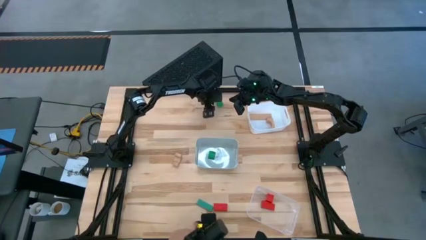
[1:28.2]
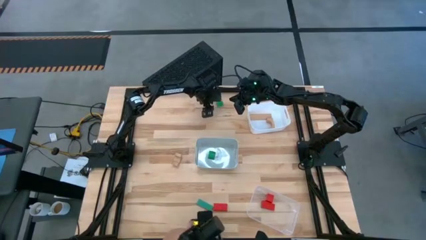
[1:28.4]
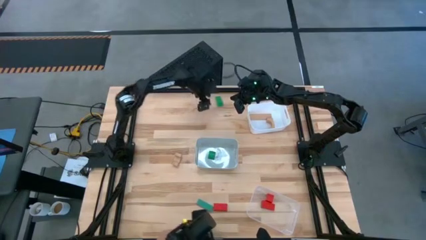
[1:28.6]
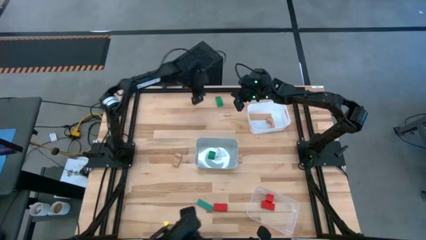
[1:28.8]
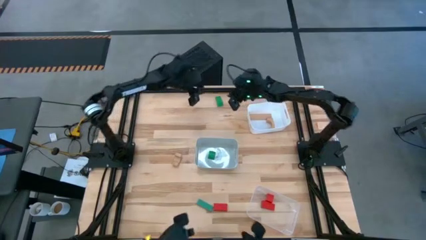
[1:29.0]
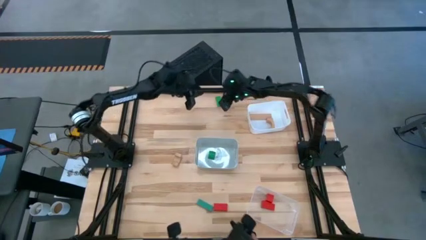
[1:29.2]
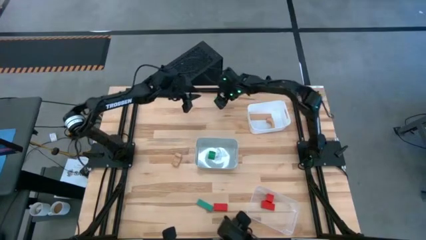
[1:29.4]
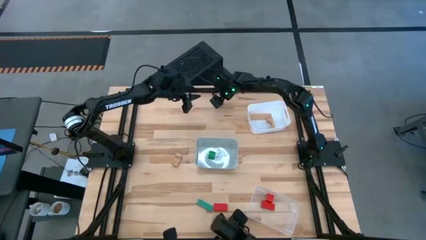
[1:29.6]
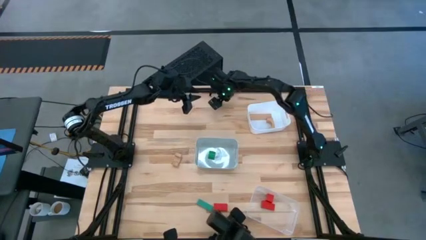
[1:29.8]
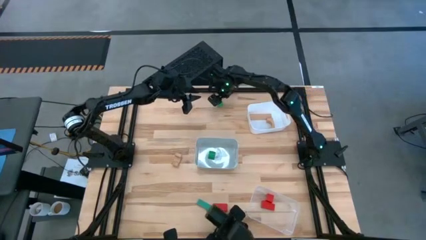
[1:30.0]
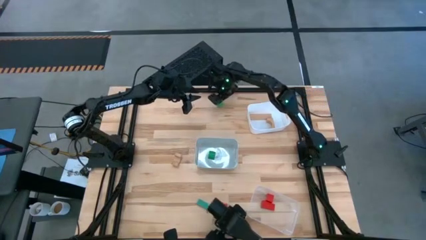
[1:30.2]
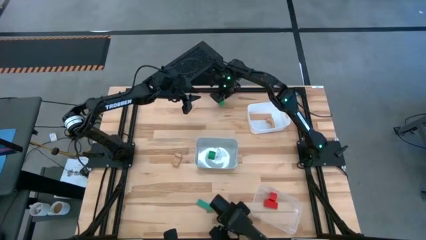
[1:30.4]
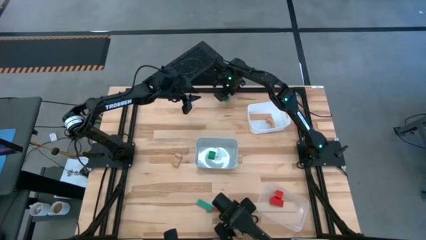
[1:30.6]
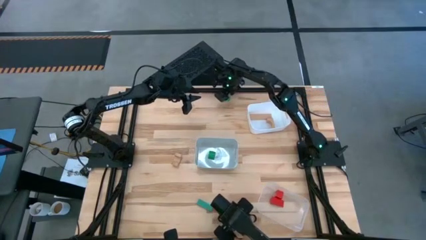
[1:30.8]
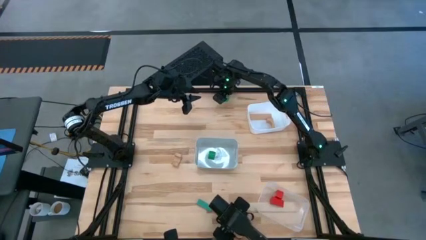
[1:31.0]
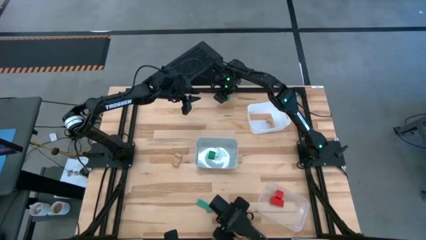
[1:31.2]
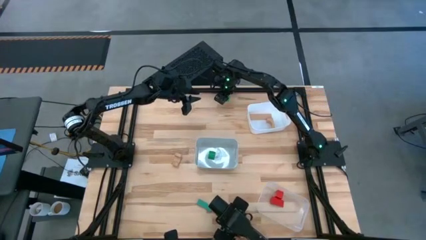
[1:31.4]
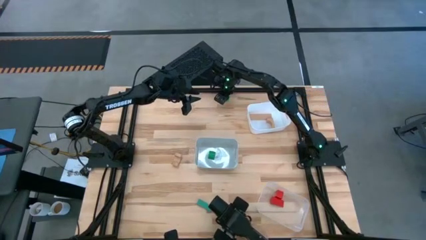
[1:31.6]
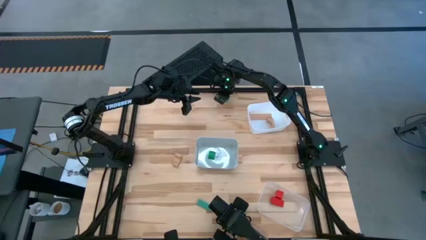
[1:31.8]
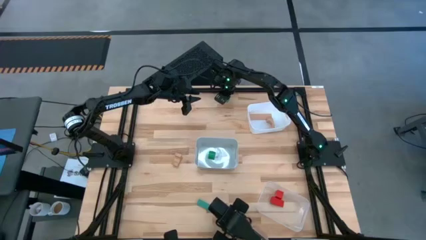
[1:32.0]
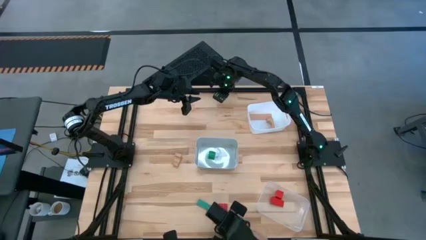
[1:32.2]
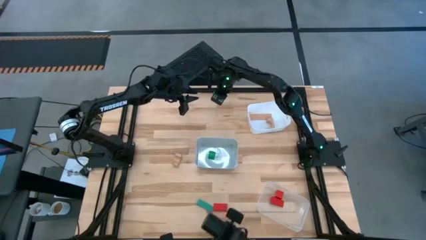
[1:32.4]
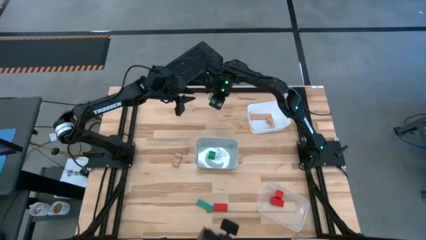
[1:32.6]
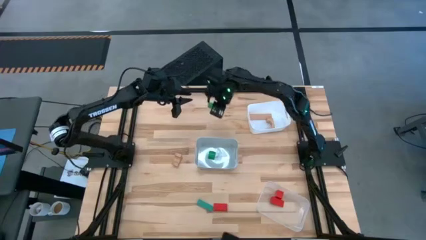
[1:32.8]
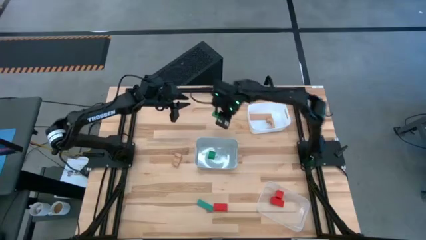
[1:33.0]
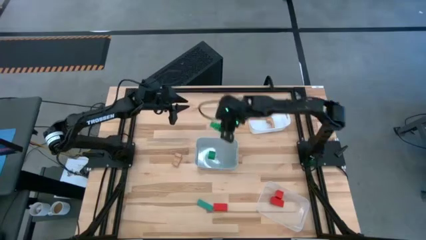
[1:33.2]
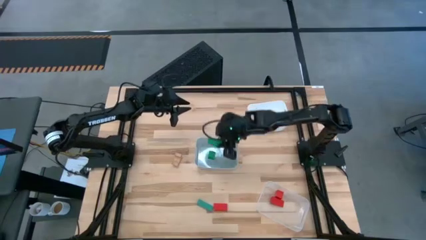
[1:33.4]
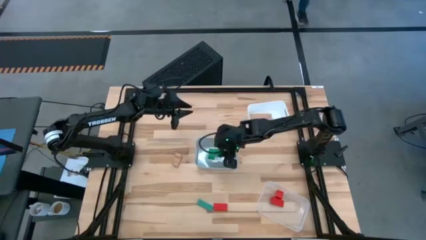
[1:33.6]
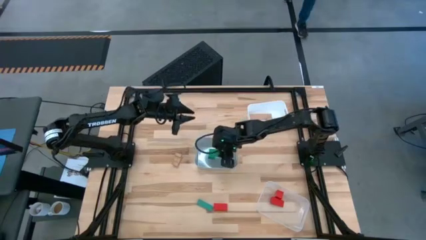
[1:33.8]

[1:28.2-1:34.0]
Task: Sort & place blocks by color
Put the top green block into the gray bin

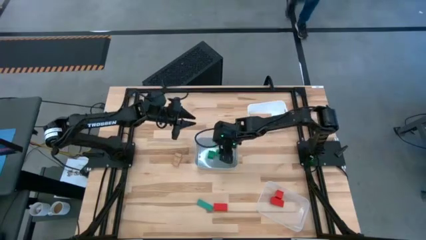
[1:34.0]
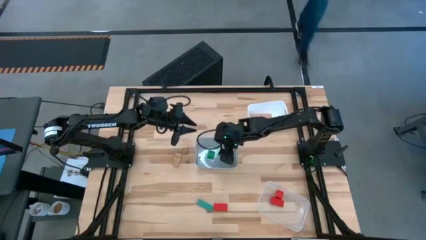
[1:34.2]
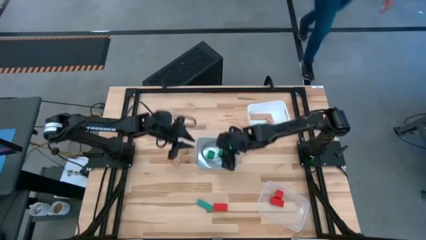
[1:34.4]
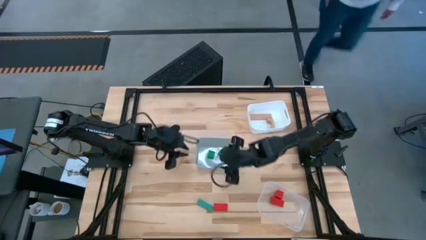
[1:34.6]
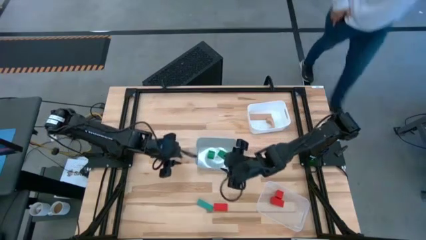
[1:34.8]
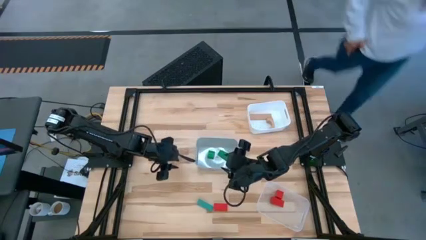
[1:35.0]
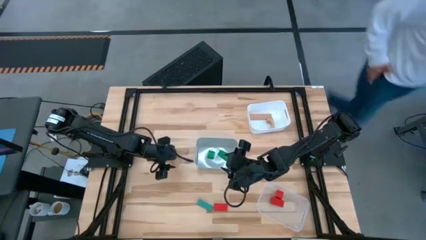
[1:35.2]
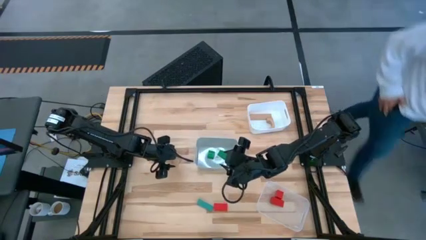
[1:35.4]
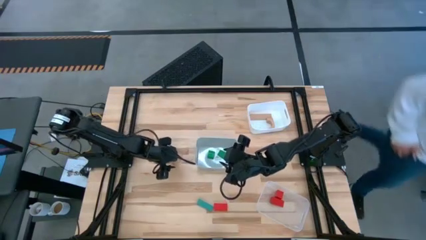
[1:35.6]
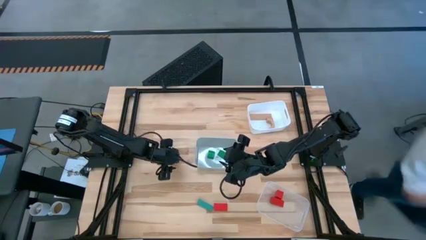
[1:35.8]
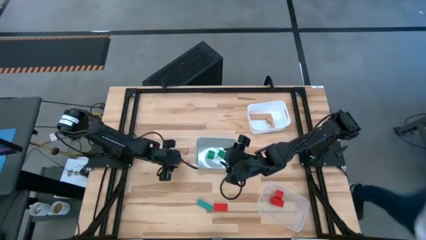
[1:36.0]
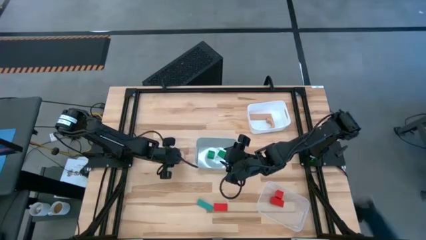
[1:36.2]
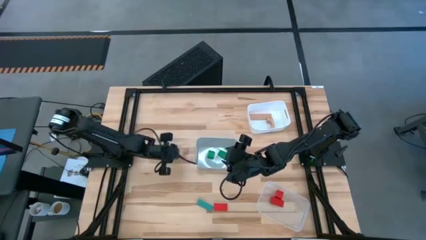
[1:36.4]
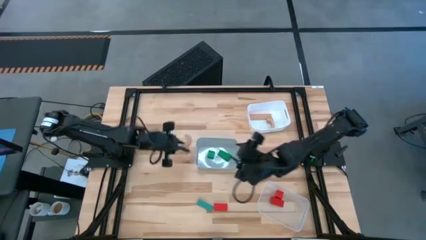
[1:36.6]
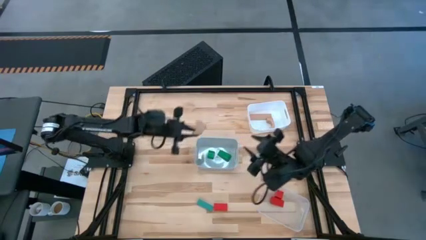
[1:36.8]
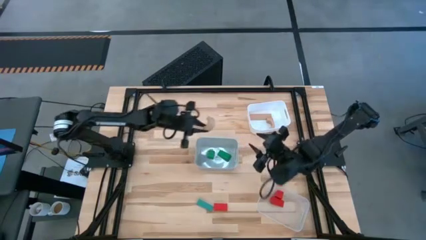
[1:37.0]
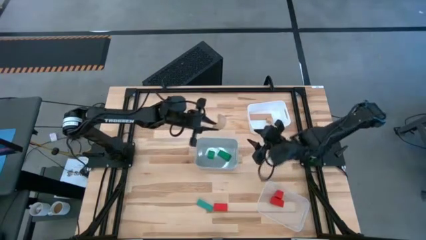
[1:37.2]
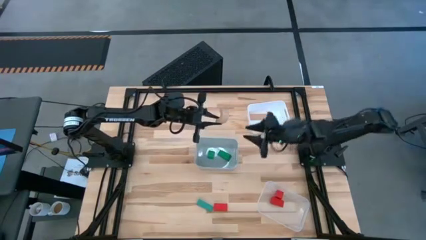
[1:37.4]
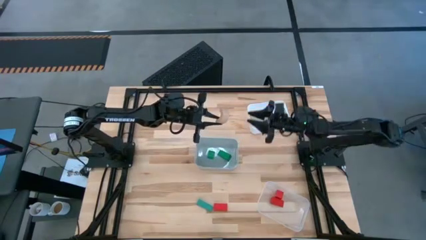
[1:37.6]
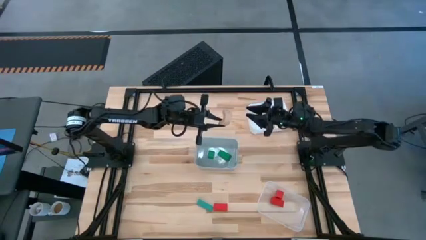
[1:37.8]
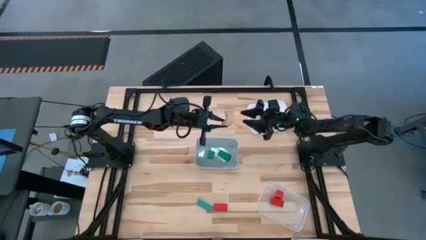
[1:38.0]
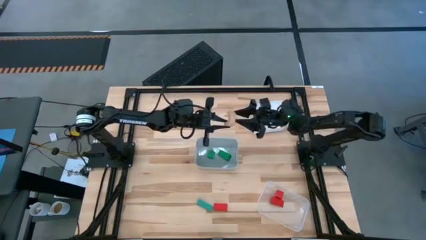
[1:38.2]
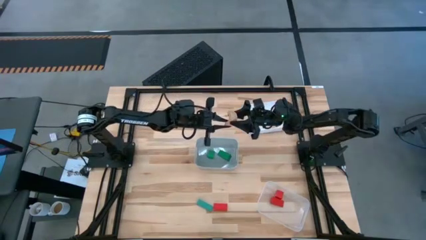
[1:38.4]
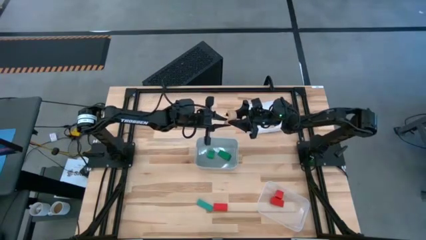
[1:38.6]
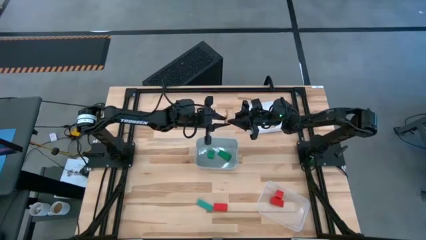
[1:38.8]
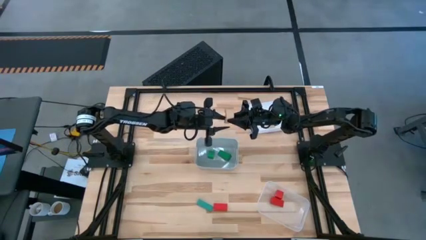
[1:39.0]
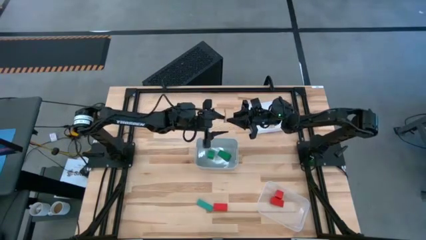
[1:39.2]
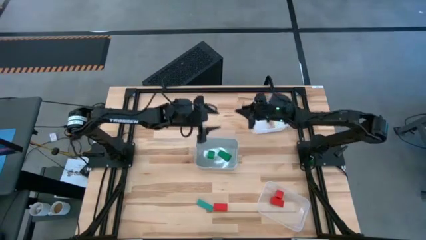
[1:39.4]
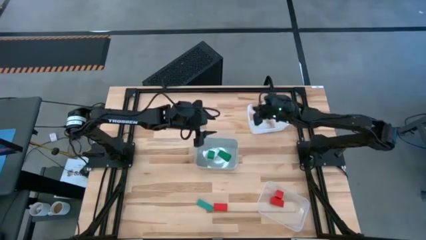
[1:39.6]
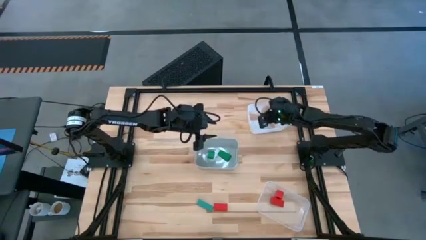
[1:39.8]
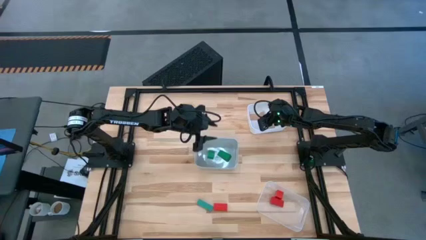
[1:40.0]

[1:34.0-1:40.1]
Put the brown block into the white bin

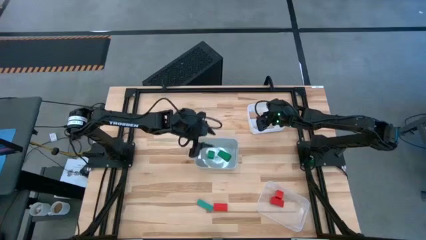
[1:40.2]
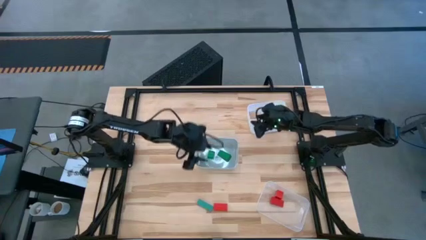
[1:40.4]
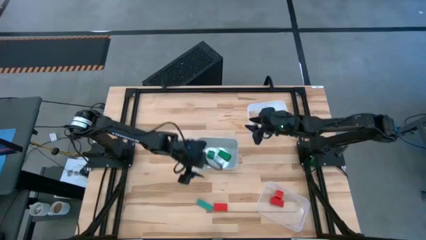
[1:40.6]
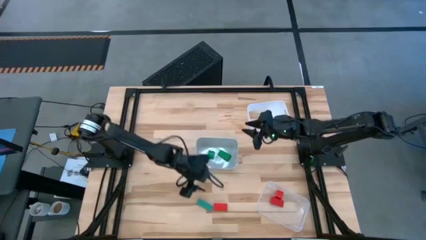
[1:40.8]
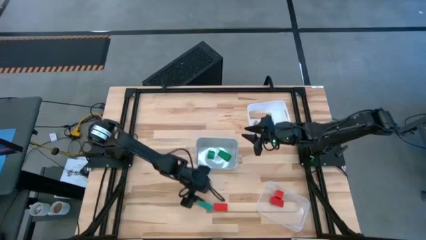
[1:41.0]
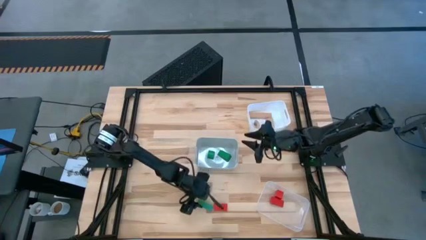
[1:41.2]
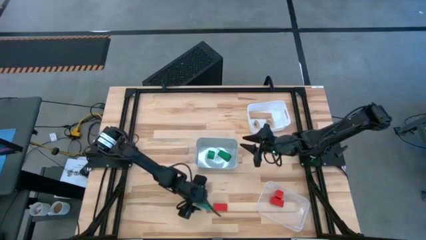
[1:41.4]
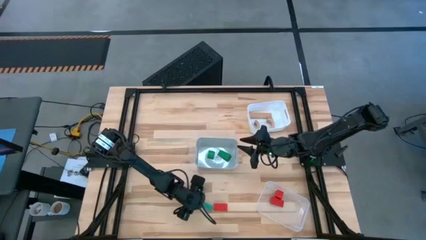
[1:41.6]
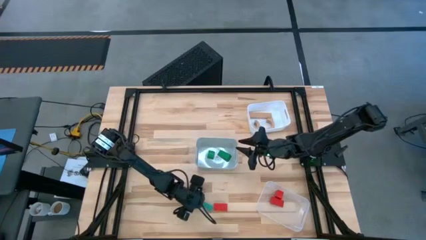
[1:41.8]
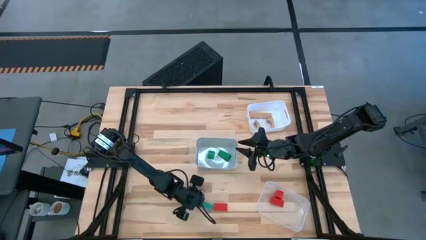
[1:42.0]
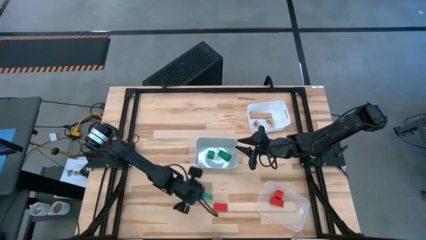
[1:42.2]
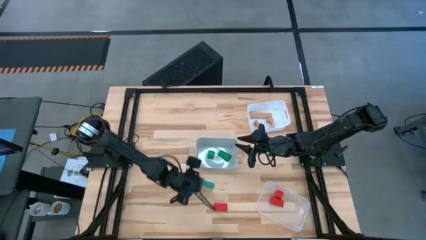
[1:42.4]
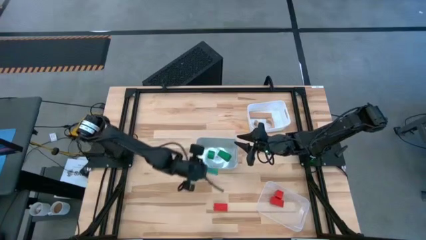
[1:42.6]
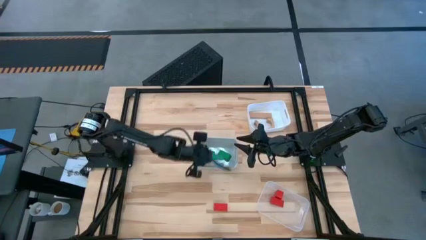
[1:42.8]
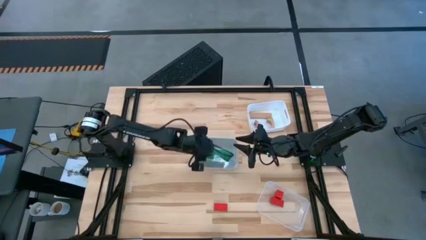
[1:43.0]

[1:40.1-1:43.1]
Put the green block into the gray bin
